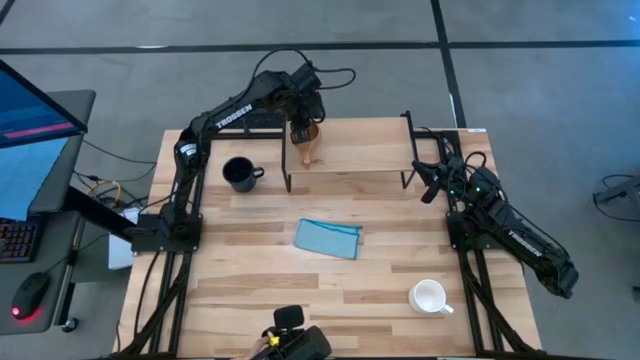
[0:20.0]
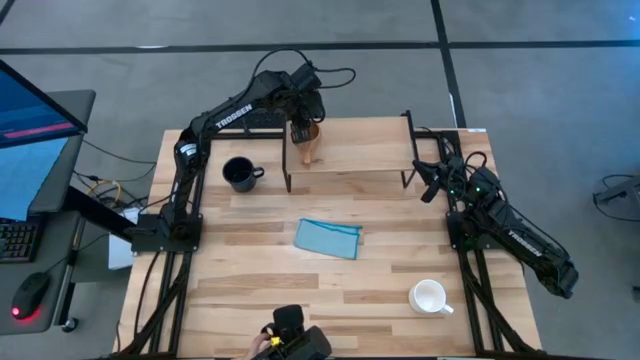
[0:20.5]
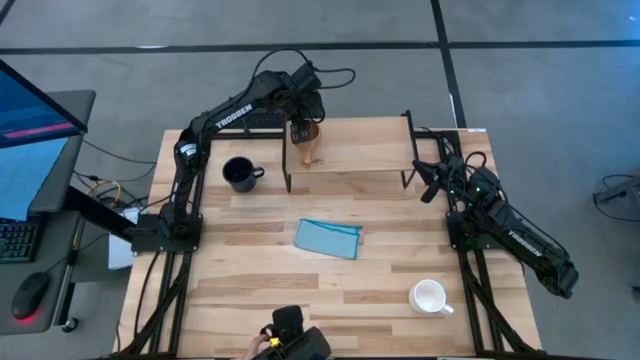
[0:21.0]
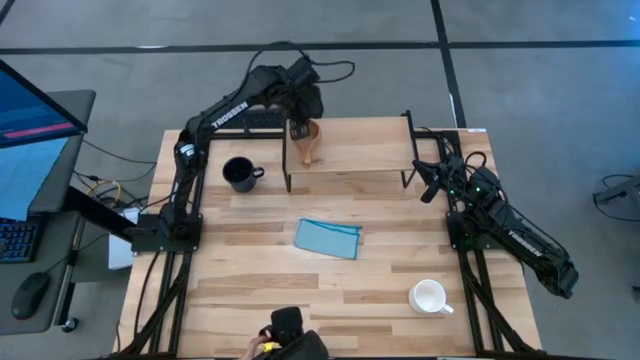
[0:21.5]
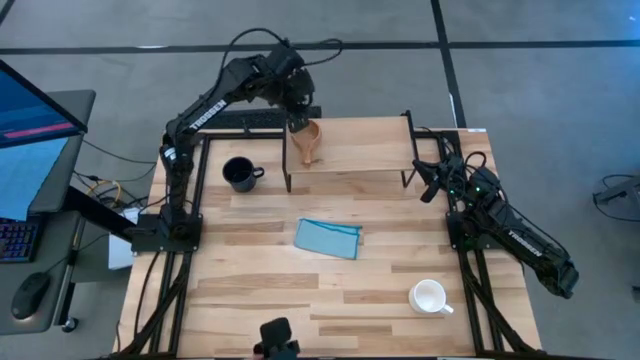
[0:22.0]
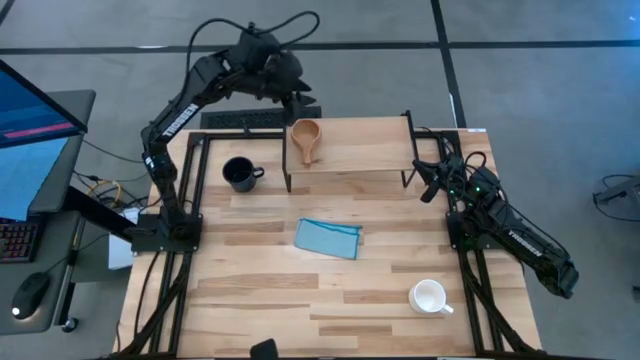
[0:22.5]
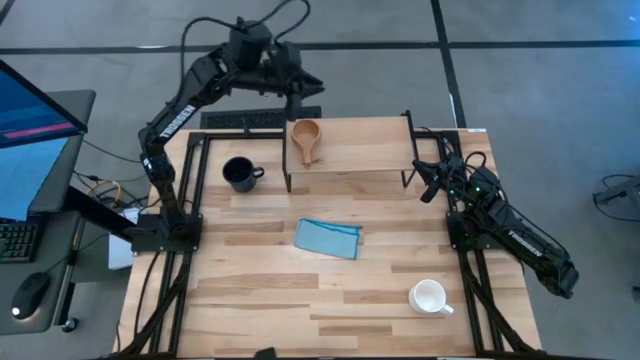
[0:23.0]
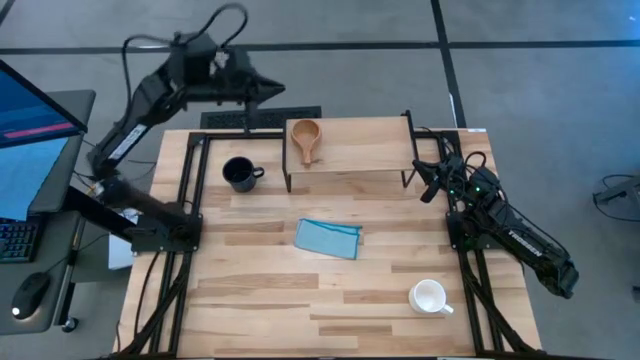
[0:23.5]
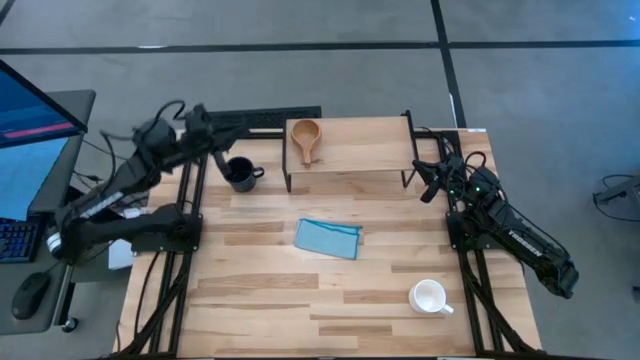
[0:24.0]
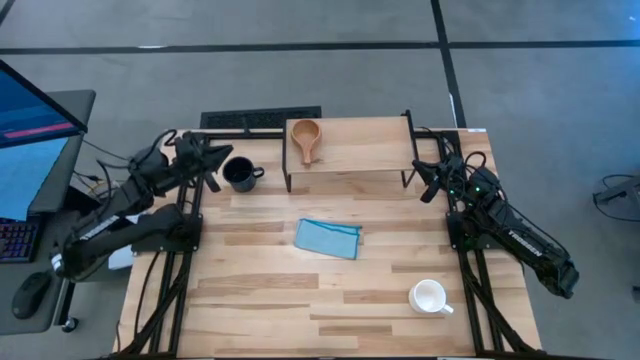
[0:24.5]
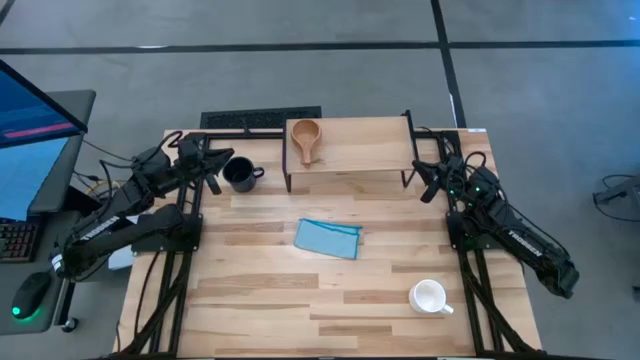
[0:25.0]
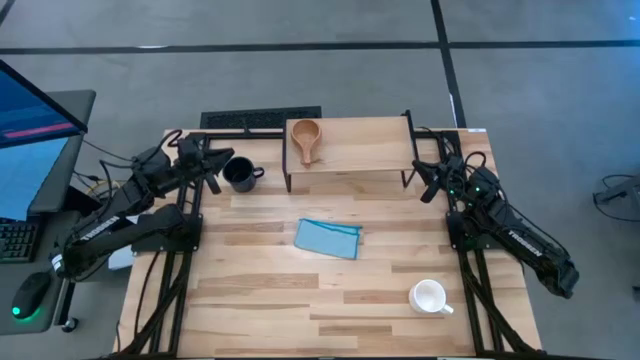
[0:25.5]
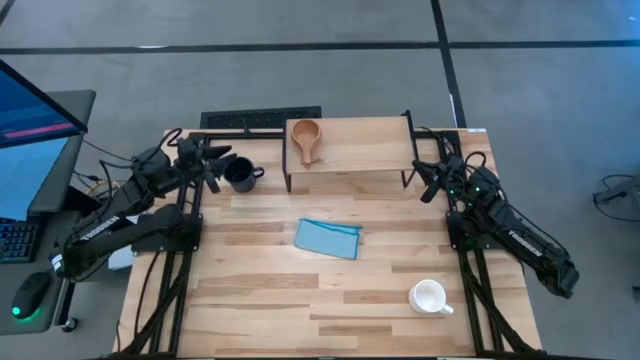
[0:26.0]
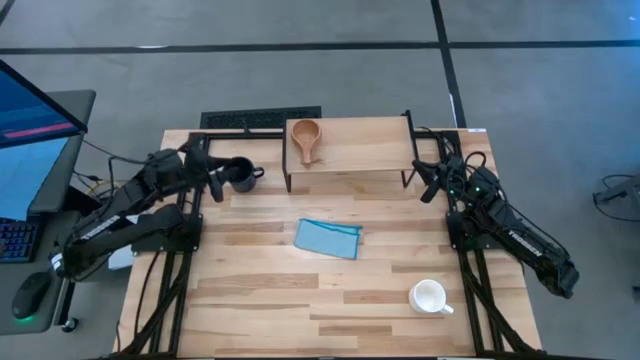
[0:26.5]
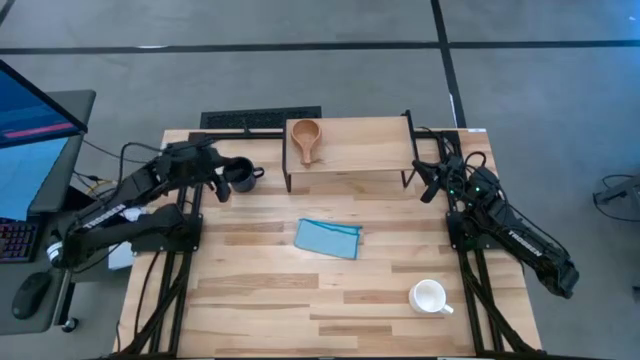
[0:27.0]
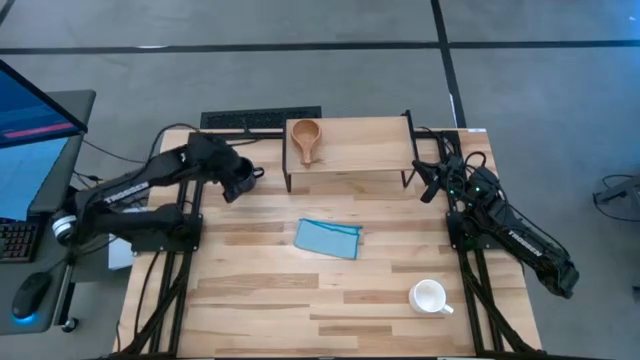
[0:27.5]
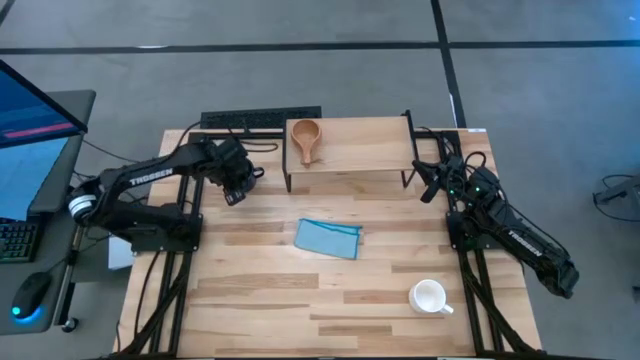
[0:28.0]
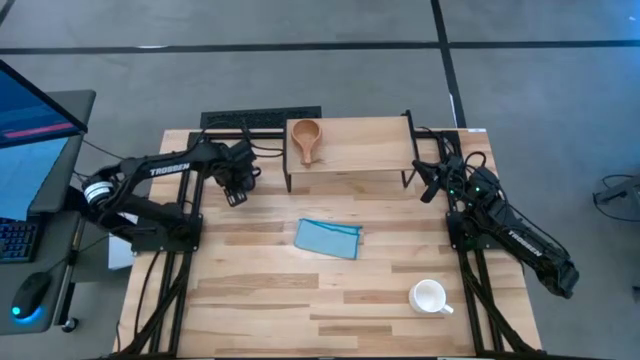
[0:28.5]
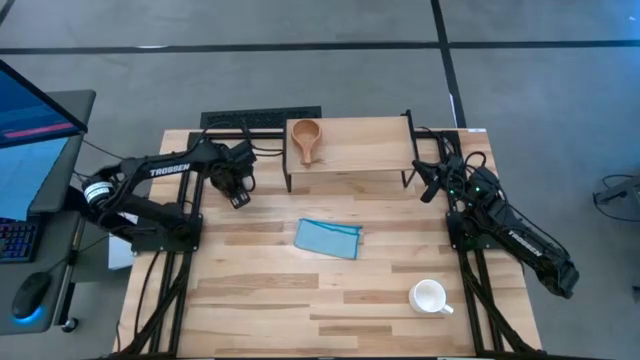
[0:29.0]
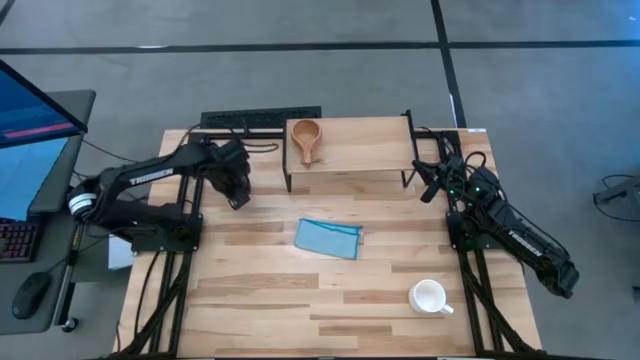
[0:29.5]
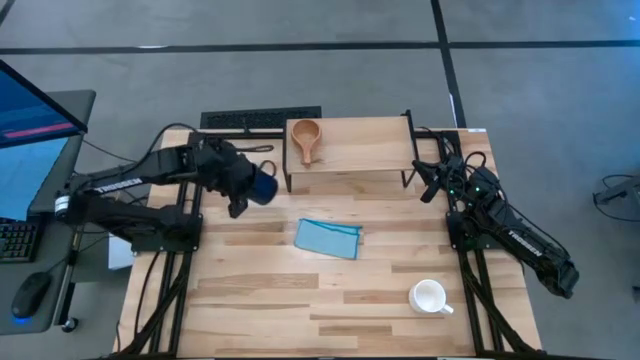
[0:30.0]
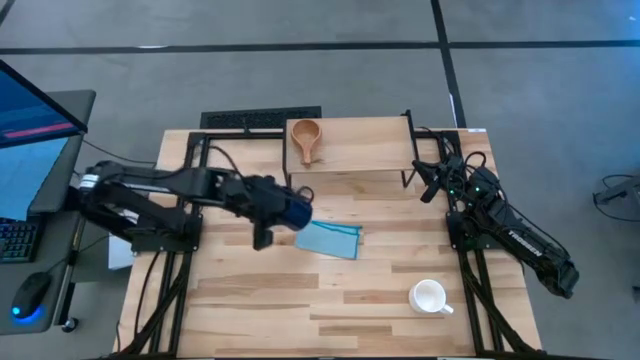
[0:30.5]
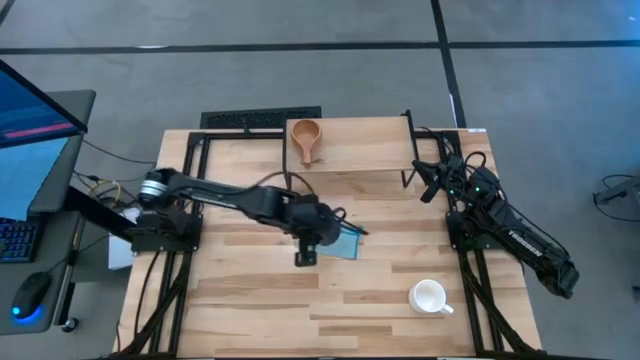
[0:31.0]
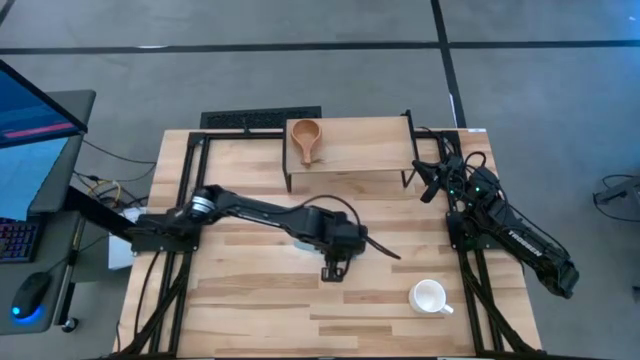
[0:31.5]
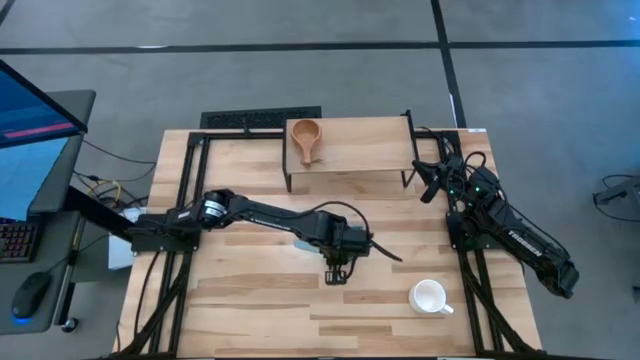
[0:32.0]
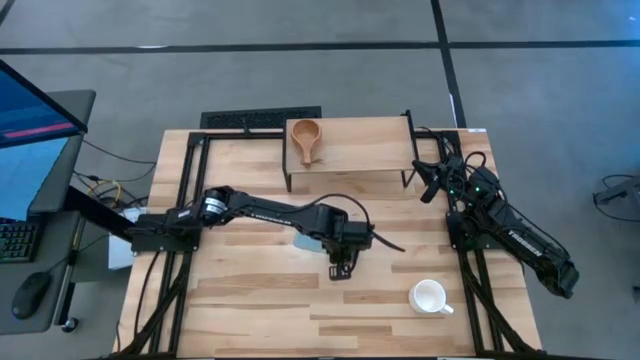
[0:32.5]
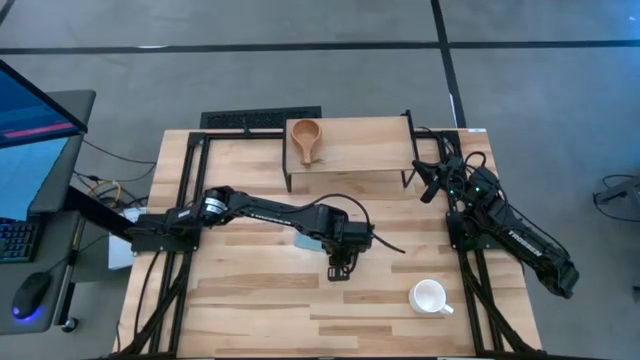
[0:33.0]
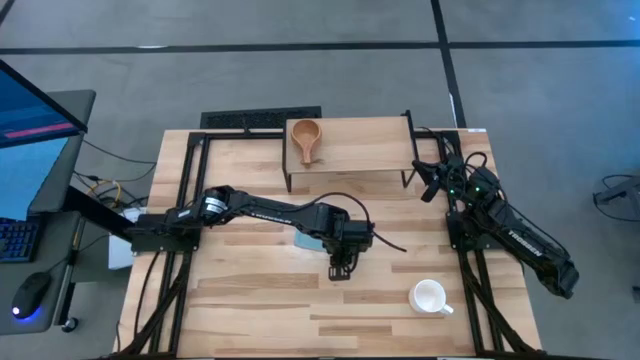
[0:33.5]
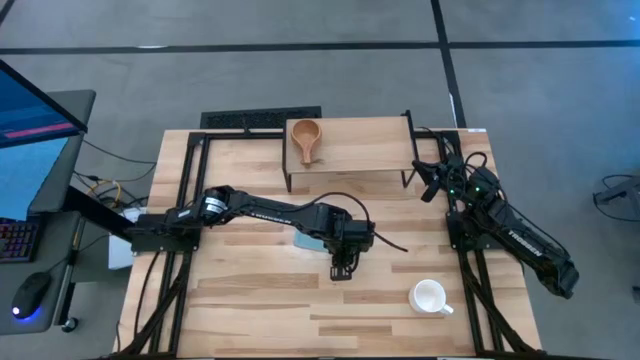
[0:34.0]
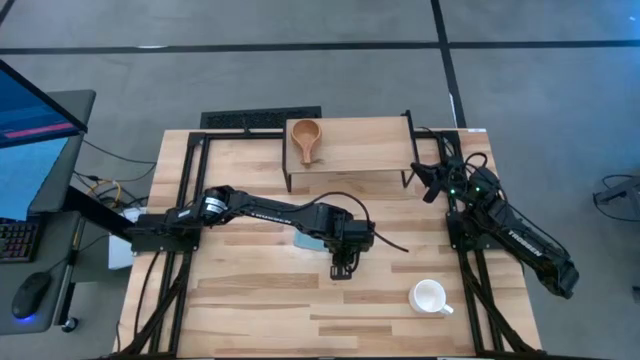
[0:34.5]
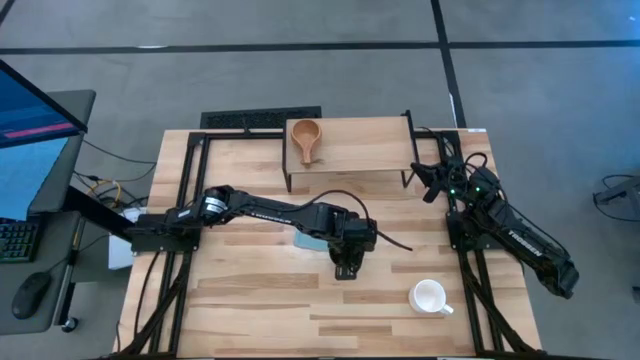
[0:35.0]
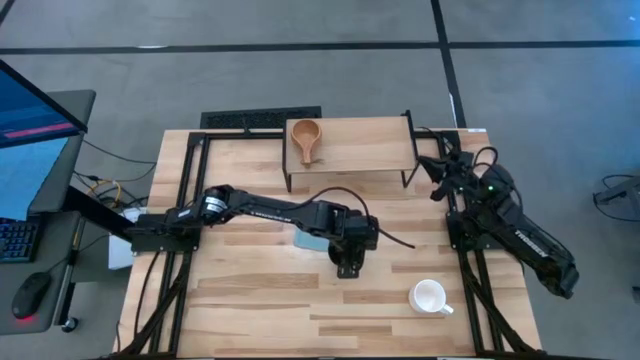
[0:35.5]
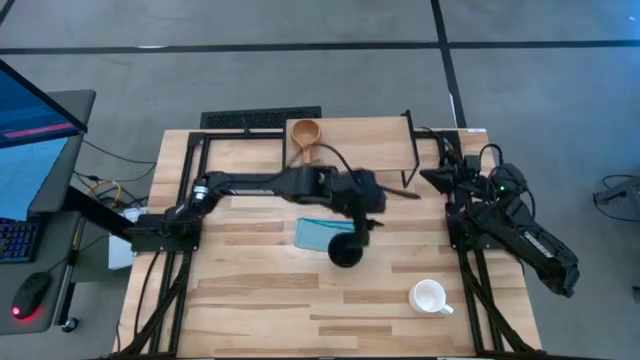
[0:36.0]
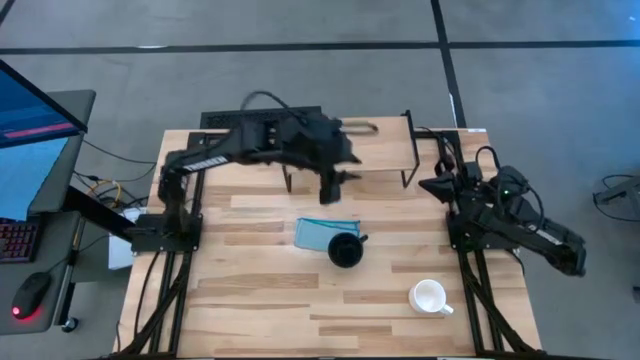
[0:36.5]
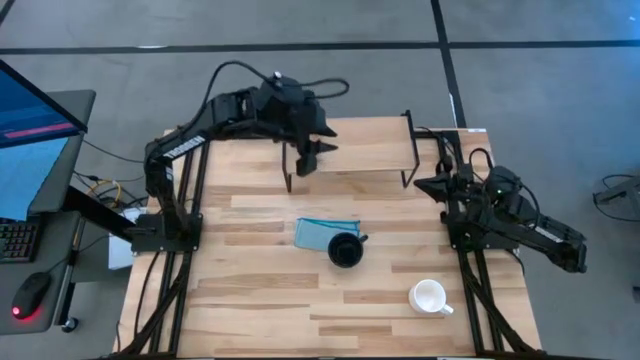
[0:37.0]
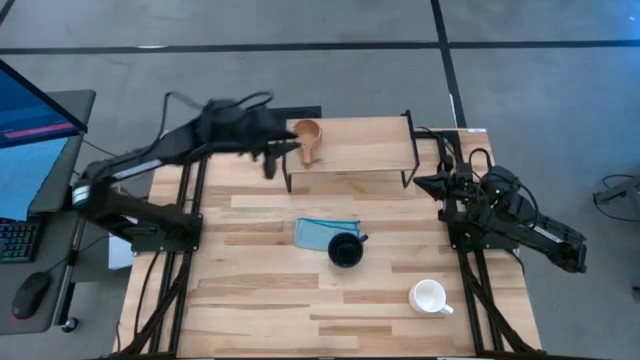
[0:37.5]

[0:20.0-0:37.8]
Task: Stack small to large cups/mugs on shelf
Put the dark blue mug on the shelf

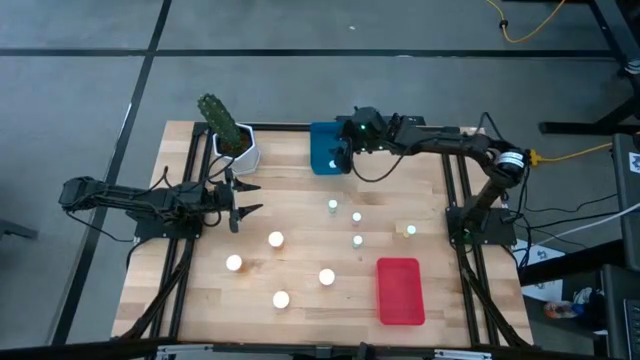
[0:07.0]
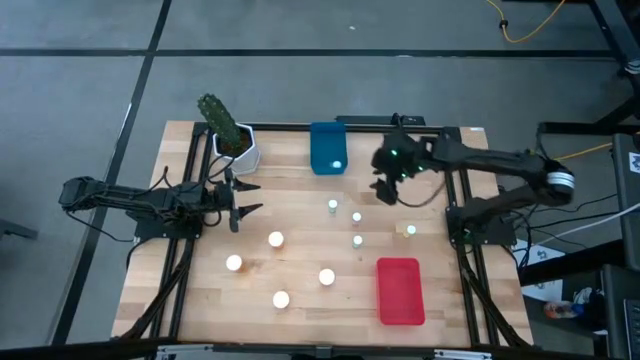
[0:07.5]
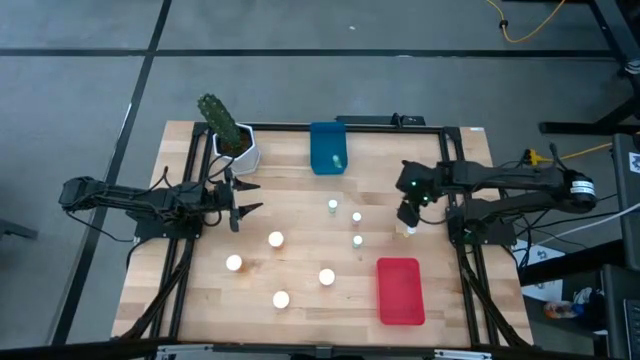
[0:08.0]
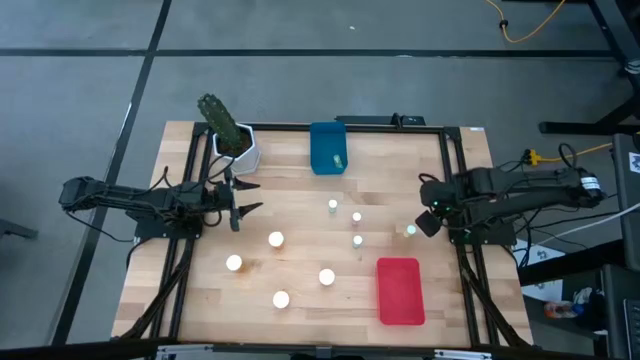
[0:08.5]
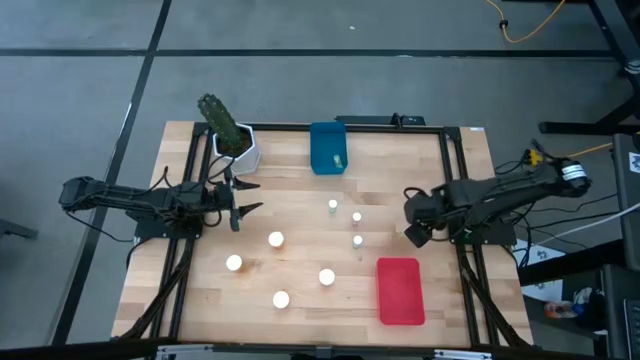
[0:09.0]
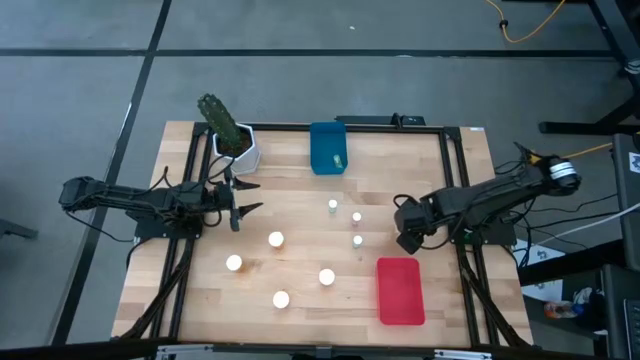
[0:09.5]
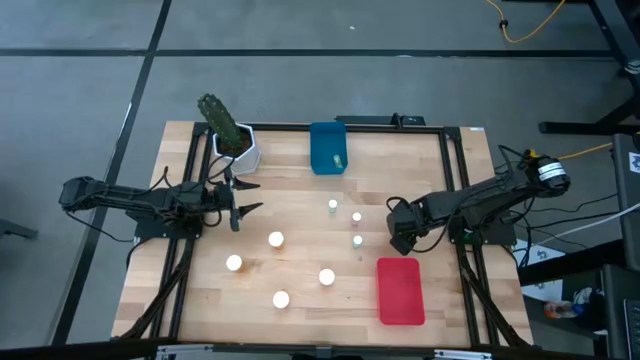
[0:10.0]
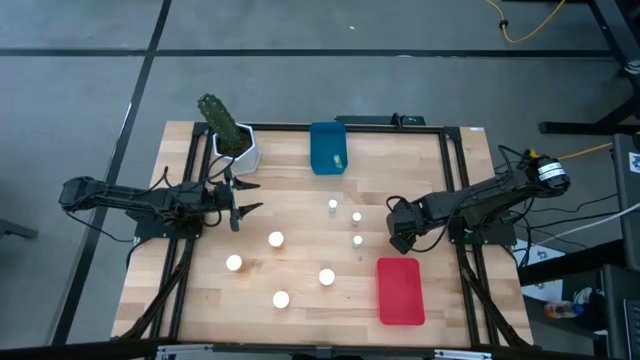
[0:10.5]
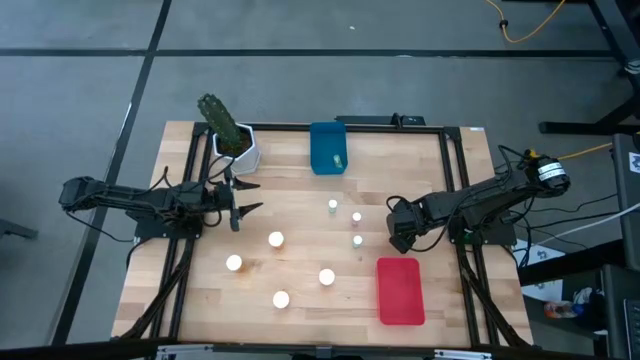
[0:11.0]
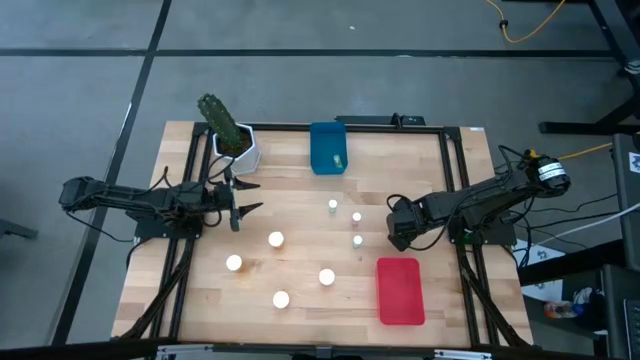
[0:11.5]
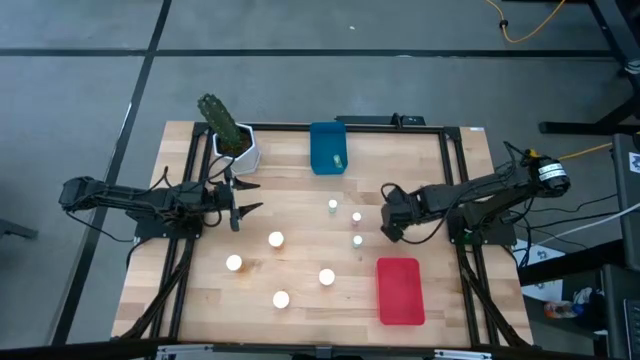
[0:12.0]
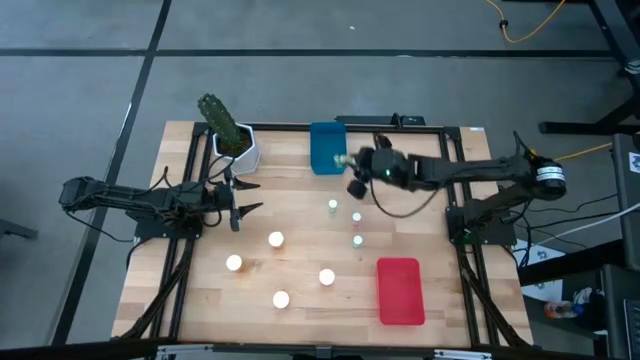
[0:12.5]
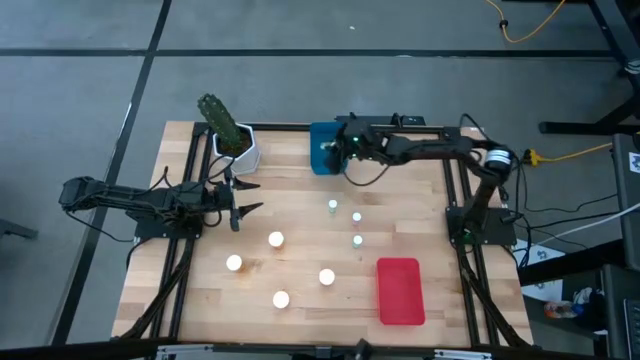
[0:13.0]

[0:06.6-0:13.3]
Task: Pick and place medicine bottles into bin by pill shape (circle, oval)
Put the small yellow pill bottle into the blue bin
